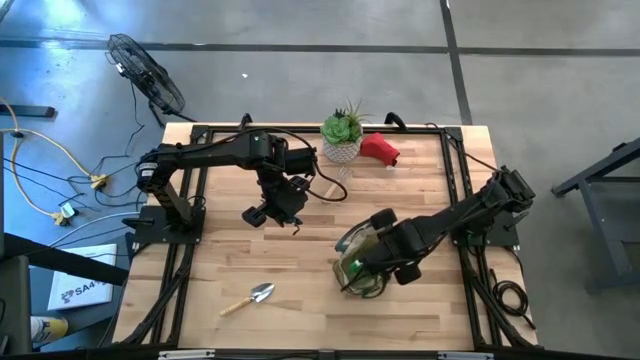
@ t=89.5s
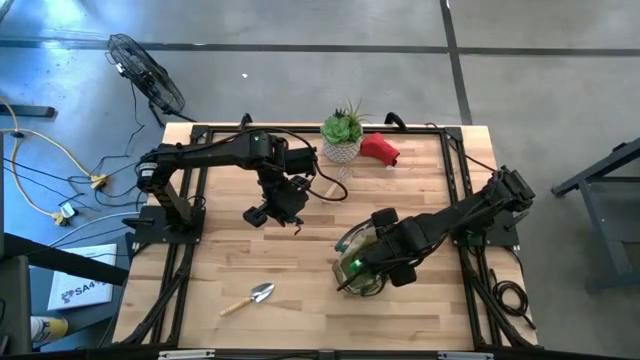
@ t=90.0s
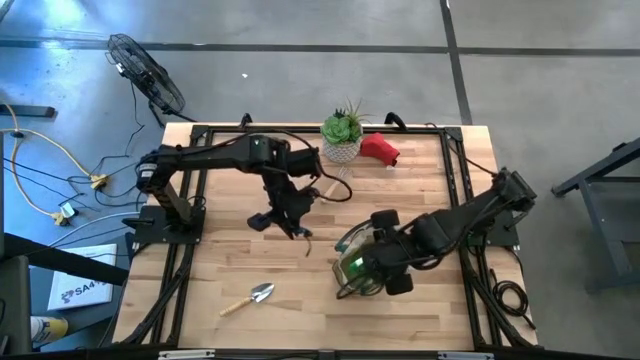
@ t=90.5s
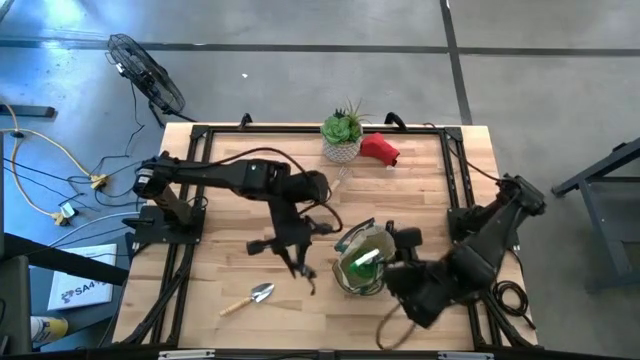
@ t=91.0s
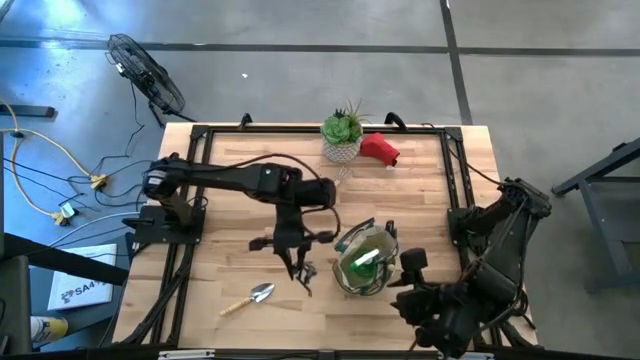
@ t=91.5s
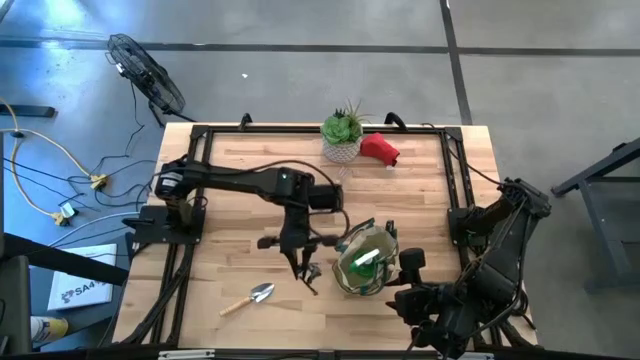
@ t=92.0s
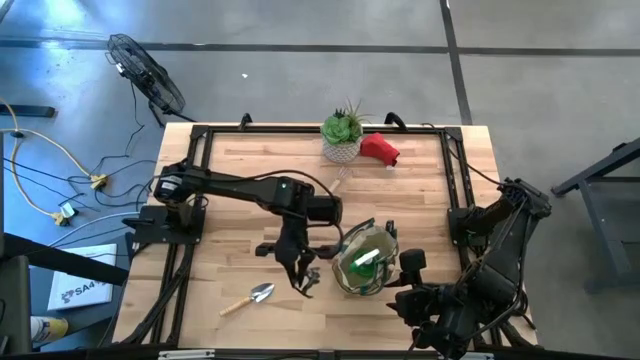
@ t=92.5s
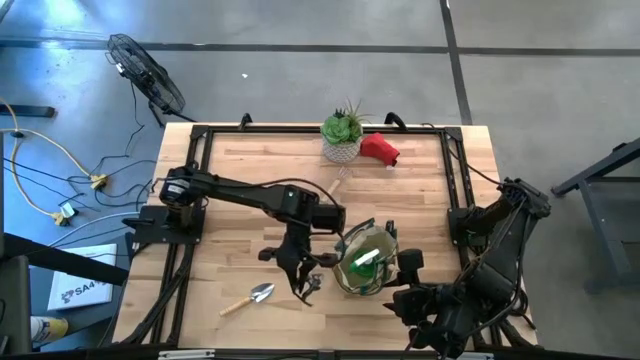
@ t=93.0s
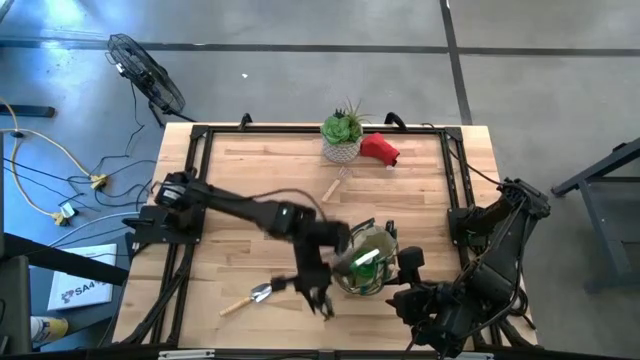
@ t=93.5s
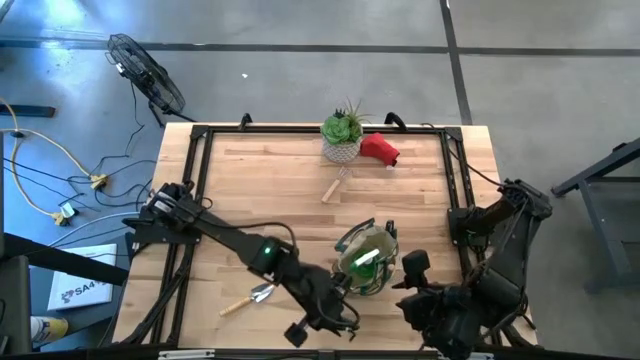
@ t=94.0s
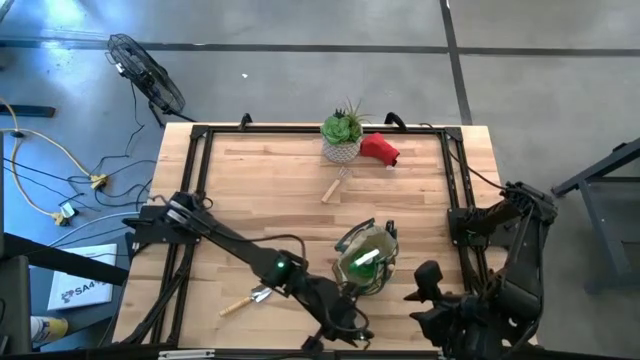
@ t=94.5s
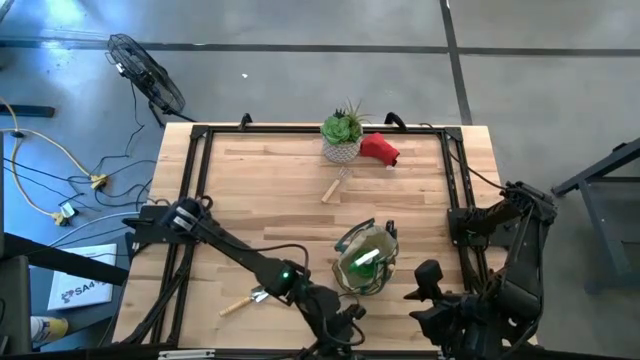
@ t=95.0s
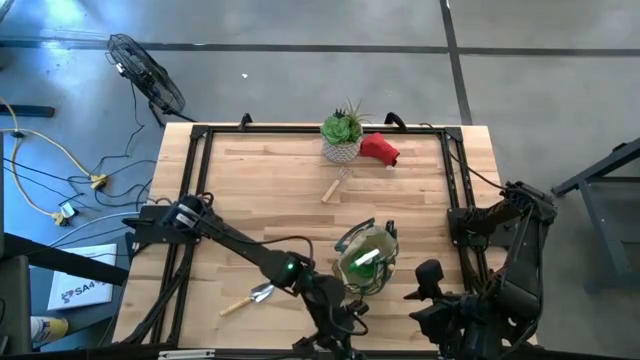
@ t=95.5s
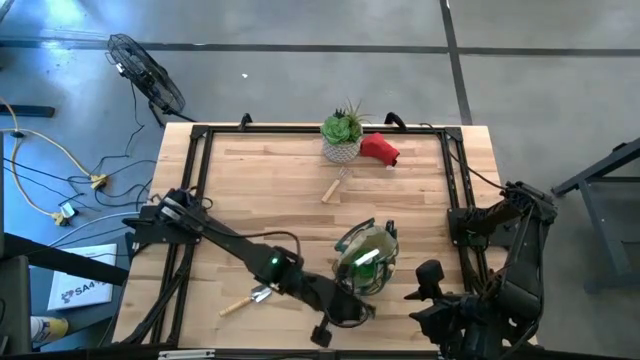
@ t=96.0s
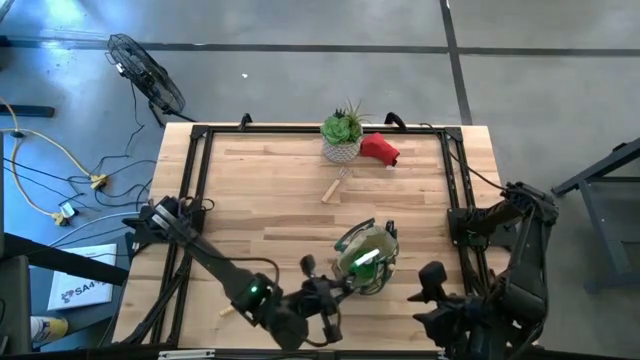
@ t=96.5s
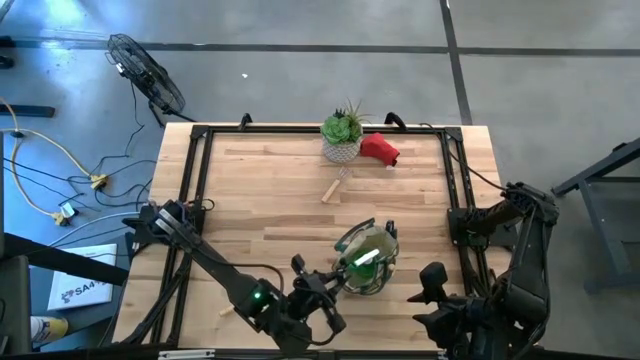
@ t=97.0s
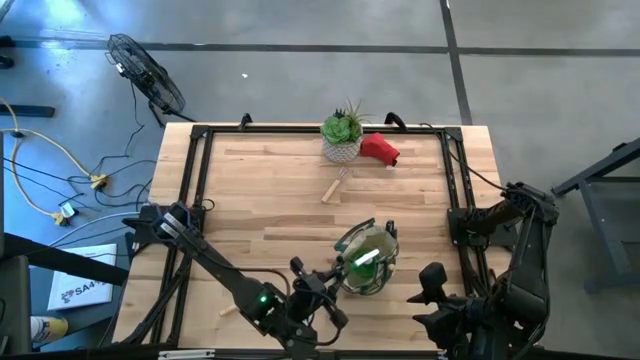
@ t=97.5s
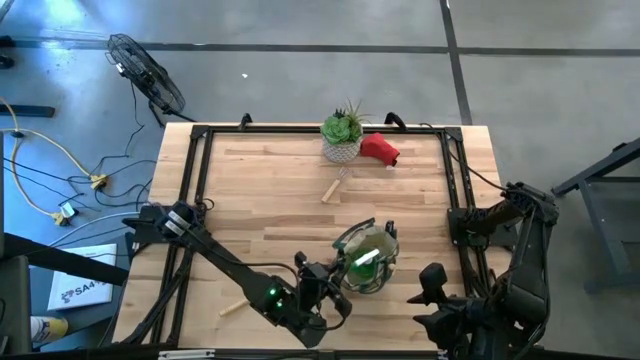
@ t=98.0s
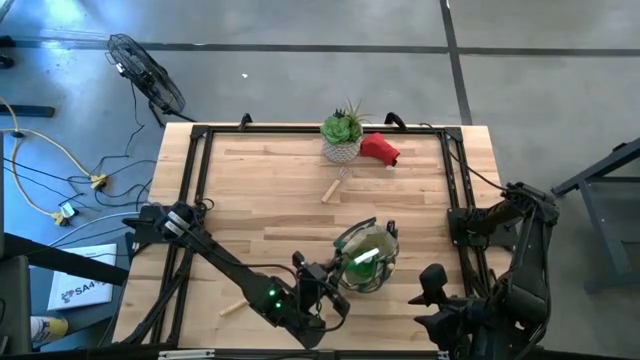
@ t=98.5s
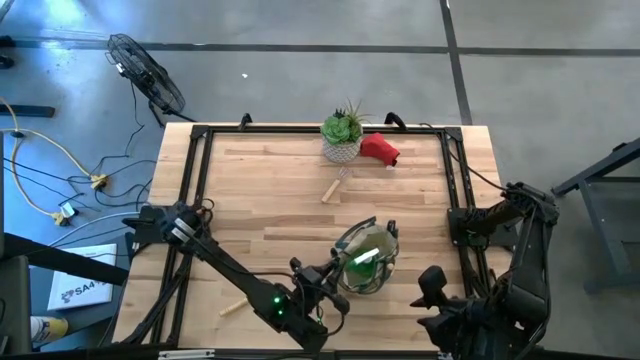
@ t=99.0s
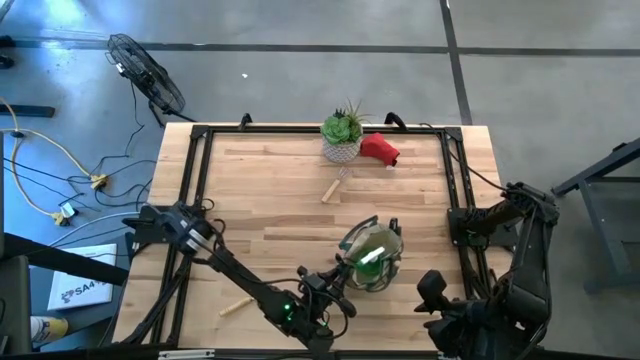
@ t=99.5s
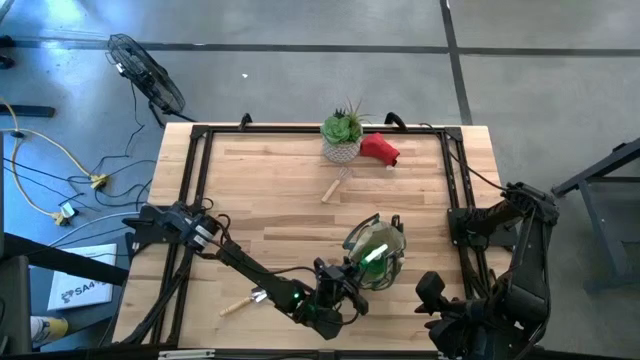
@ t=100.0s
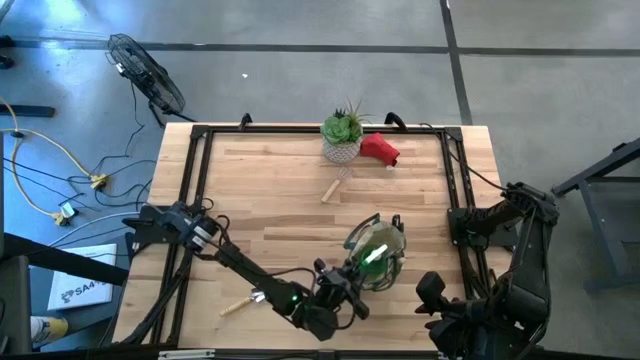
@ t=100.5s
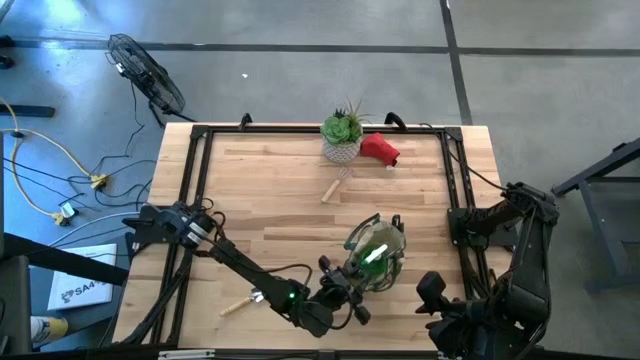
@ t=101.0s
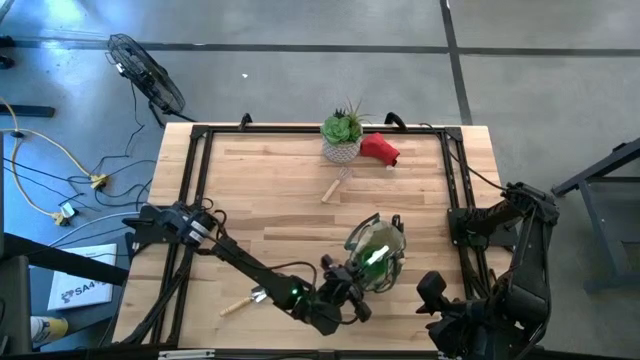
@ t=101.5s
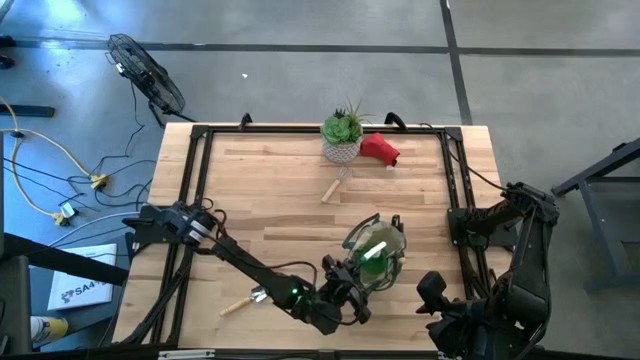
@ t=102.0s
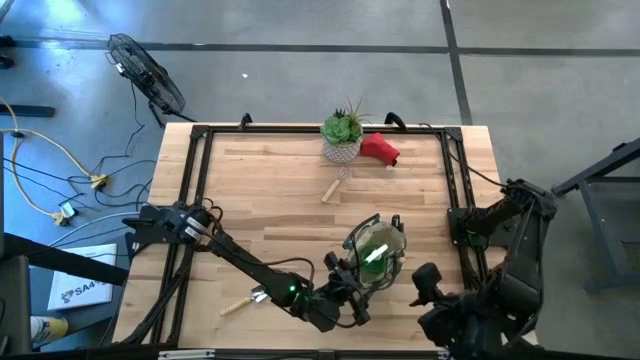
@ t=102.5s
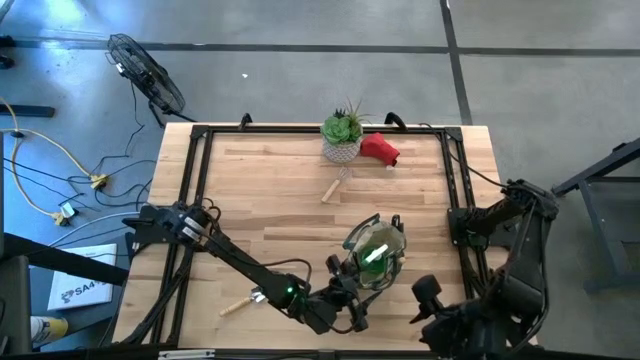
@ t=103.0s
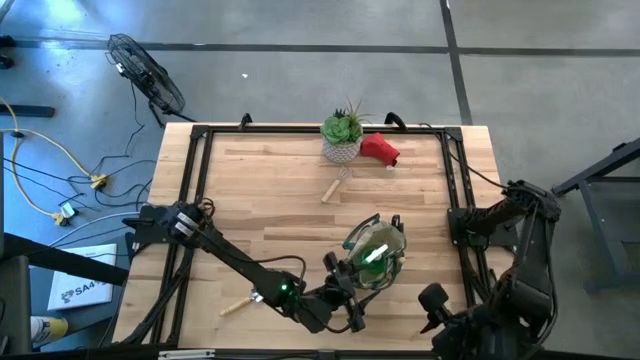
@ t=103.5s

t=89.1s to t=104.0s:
Task: Pick & Place Garden tools in Gardening bag
Put the green shear scissors into the gardening bag

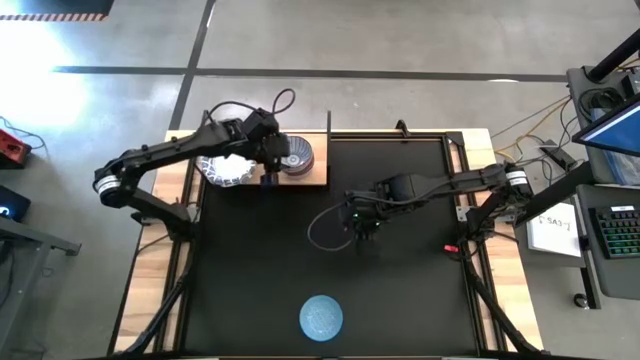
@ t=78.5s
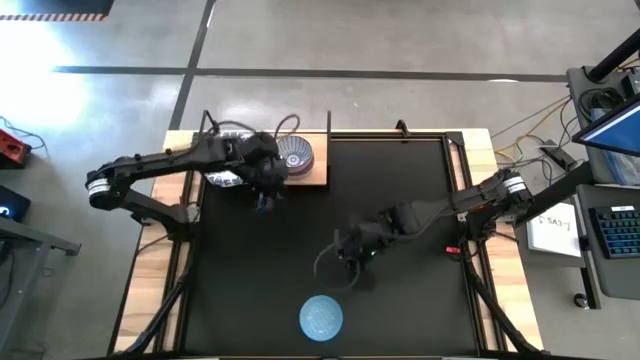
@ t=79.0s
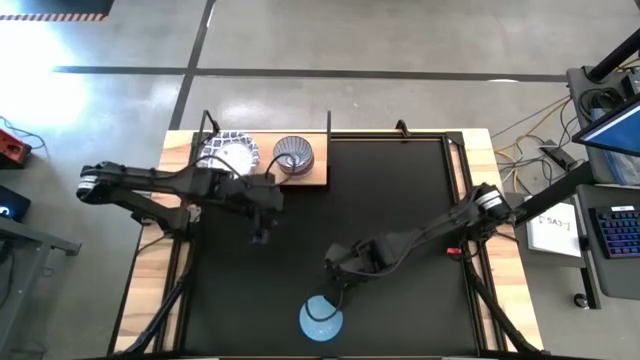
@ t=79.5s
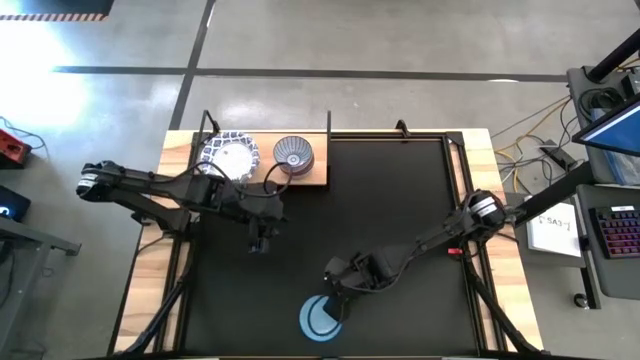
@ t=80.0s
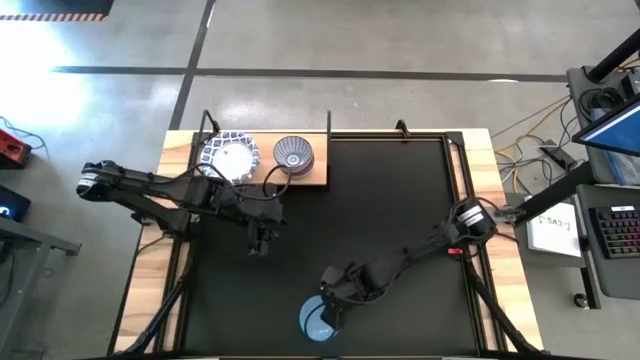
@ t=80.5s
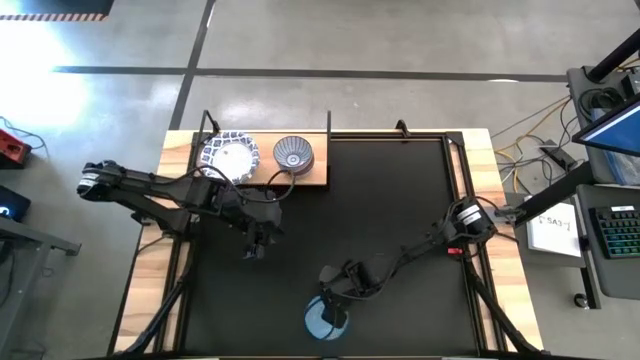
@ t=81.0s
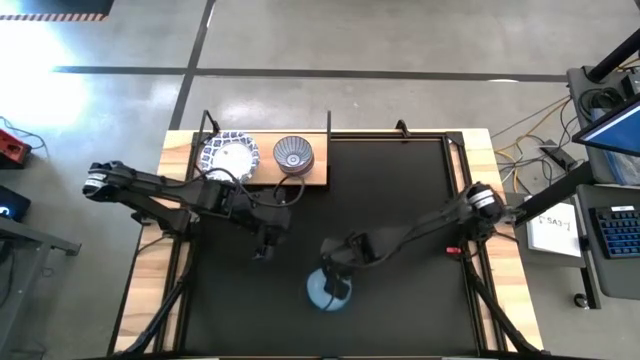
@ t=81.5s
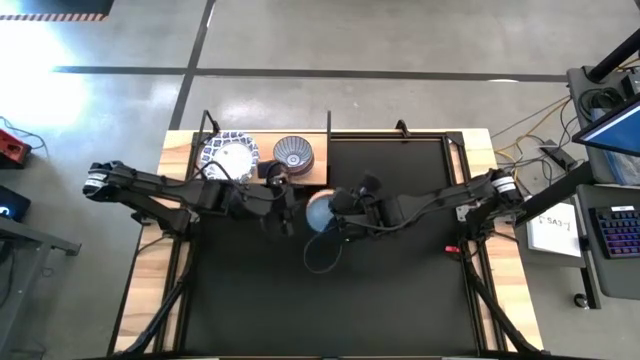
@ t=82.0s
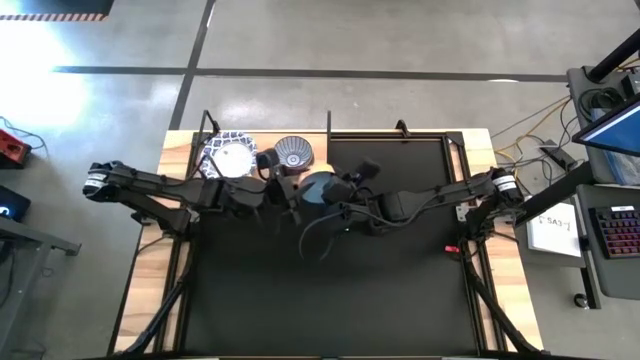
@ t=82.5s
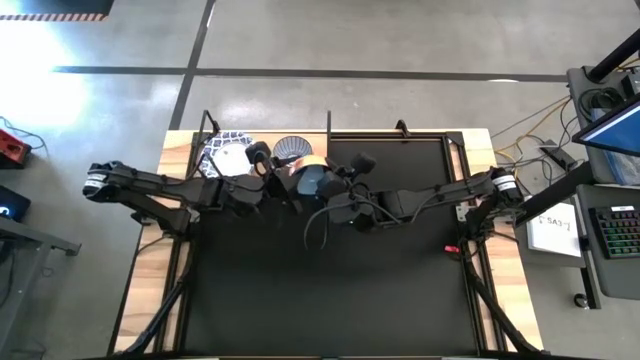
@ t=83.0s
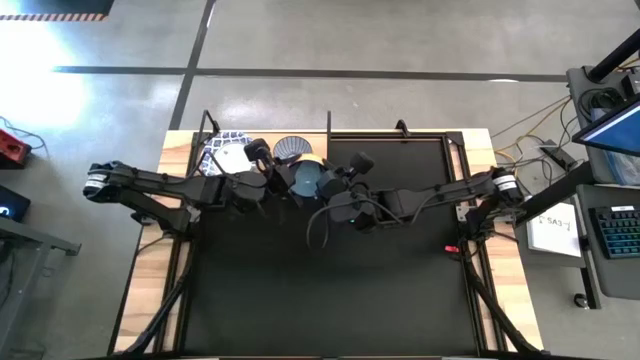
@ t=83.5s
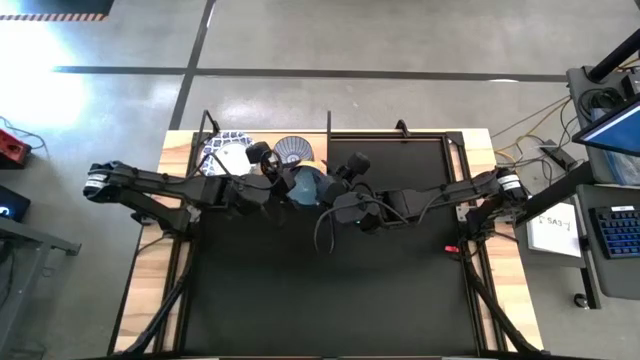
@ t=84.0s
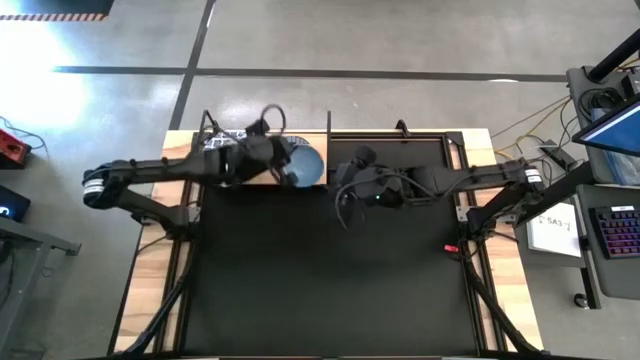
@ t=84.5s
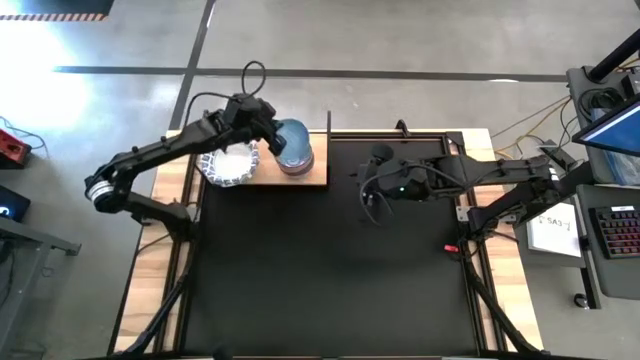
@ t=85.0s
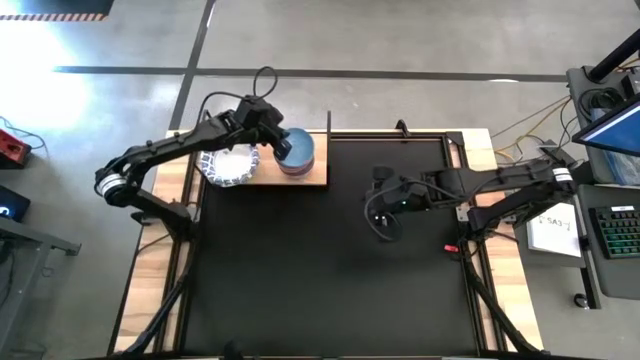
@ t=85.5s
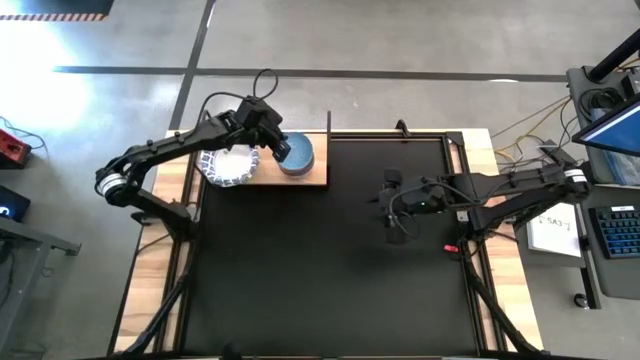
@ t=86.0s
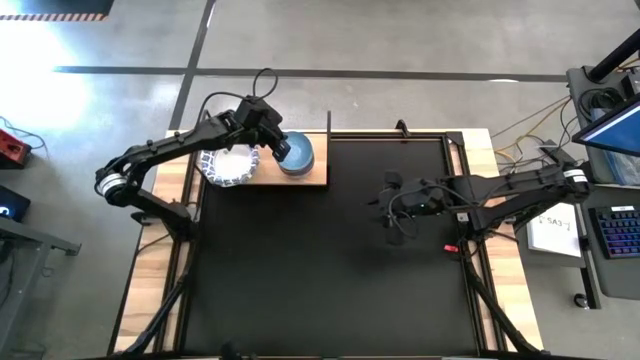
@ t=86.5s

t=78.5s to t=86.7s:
Task: Place and stack bowls onto a shelf
Stack the blue patterned bowl on top of the dark blue patterned bowl on the shelf
